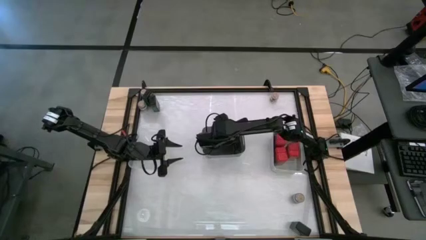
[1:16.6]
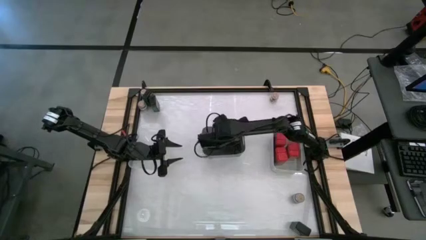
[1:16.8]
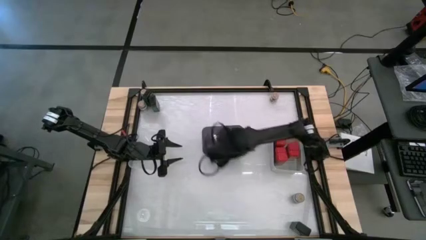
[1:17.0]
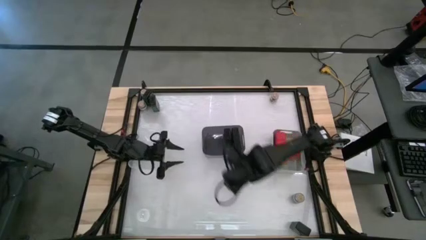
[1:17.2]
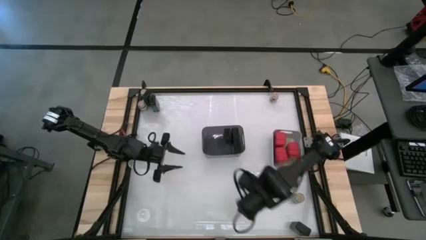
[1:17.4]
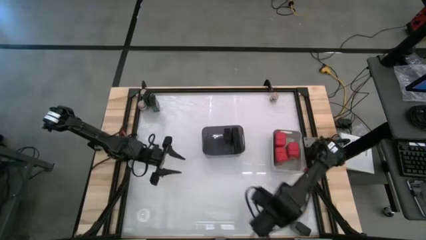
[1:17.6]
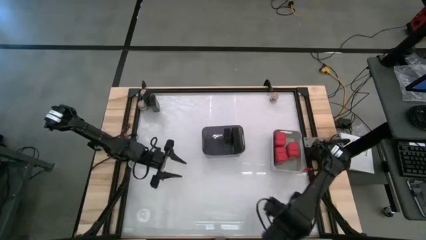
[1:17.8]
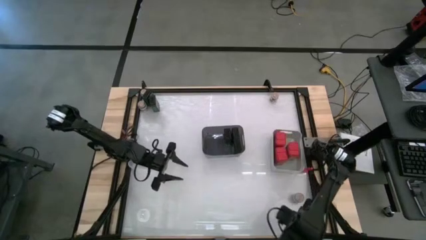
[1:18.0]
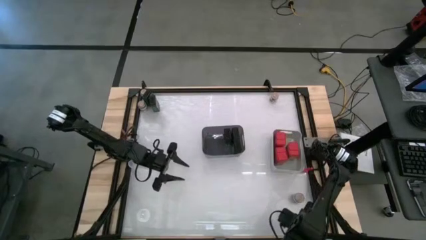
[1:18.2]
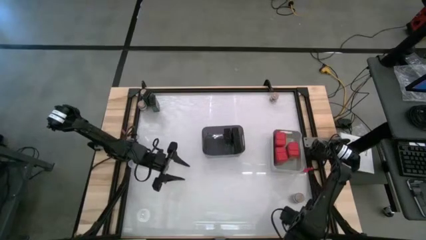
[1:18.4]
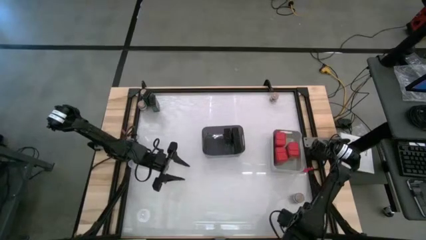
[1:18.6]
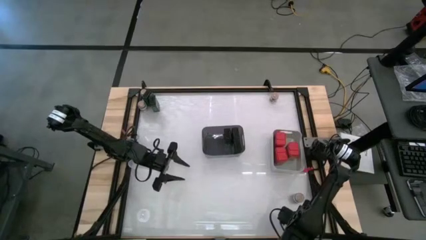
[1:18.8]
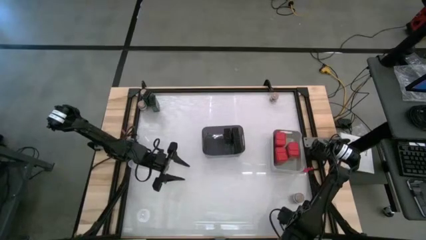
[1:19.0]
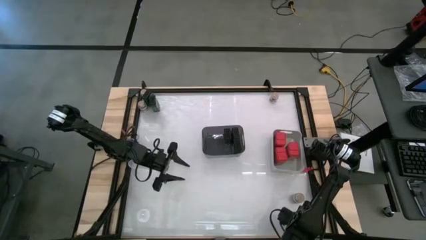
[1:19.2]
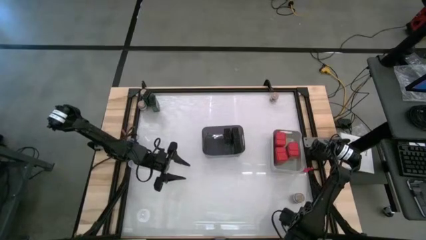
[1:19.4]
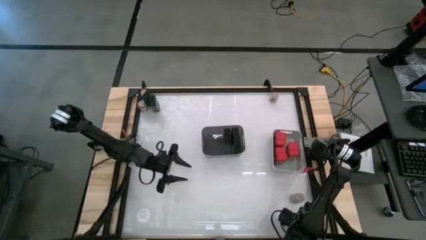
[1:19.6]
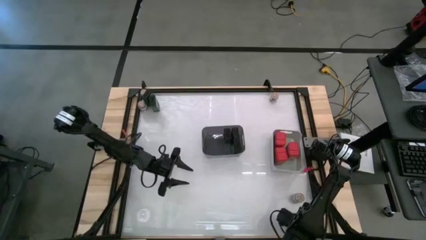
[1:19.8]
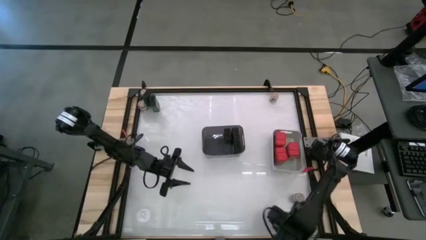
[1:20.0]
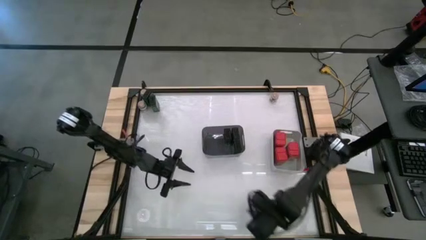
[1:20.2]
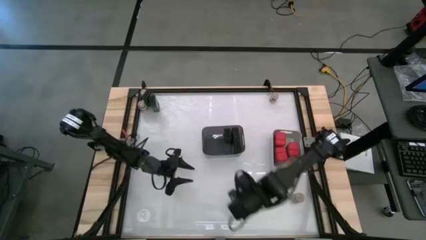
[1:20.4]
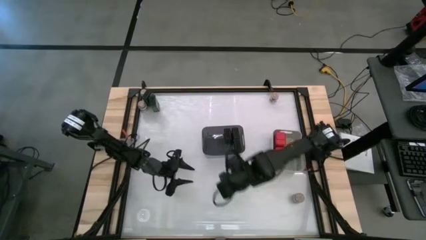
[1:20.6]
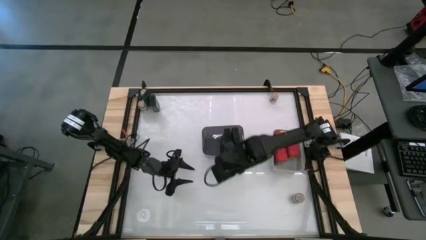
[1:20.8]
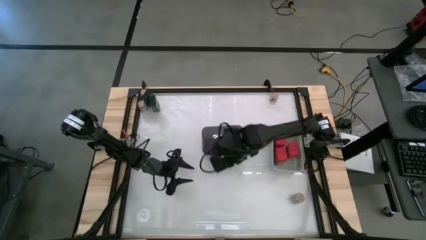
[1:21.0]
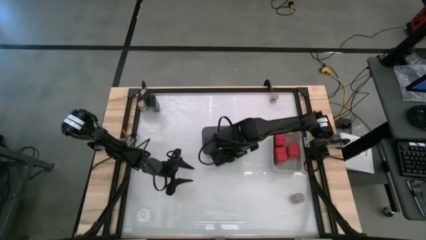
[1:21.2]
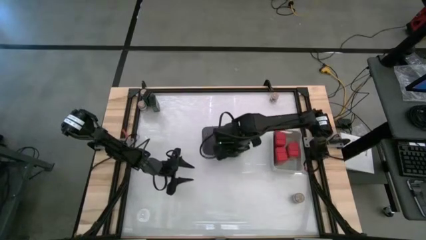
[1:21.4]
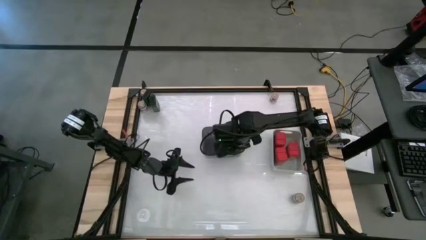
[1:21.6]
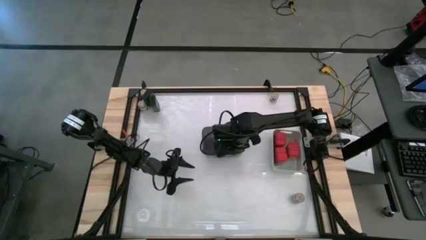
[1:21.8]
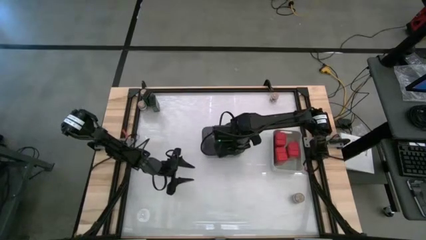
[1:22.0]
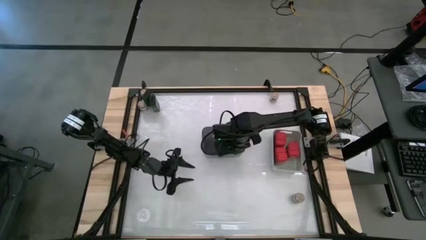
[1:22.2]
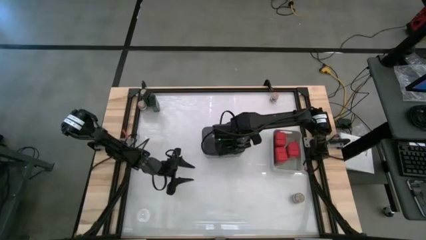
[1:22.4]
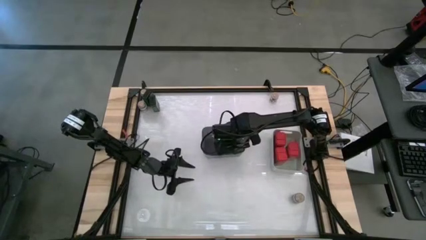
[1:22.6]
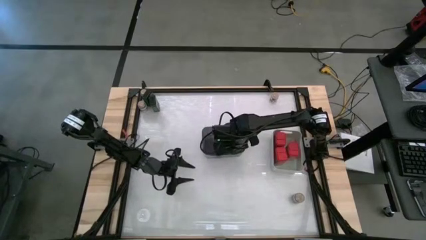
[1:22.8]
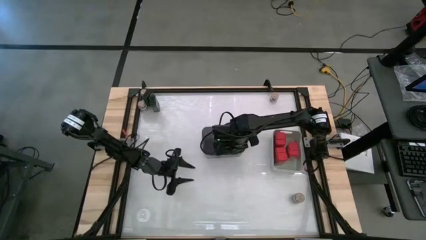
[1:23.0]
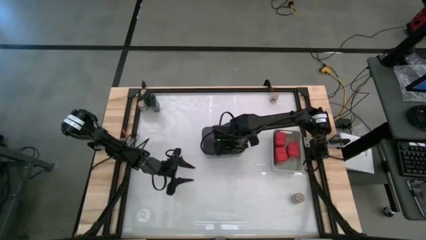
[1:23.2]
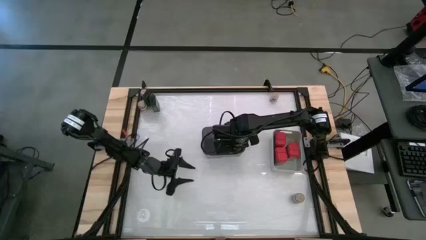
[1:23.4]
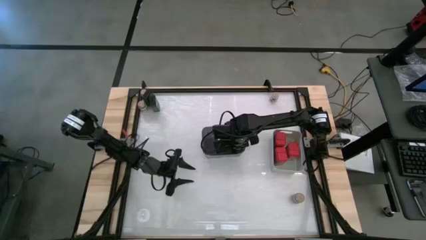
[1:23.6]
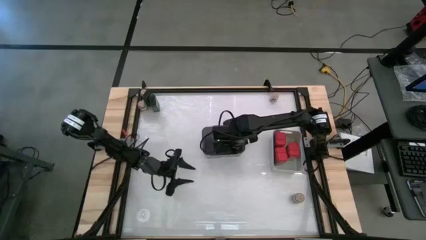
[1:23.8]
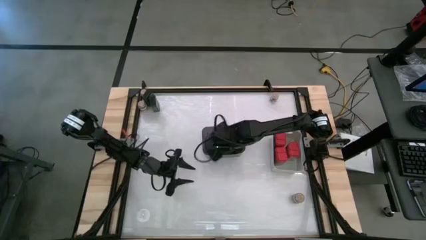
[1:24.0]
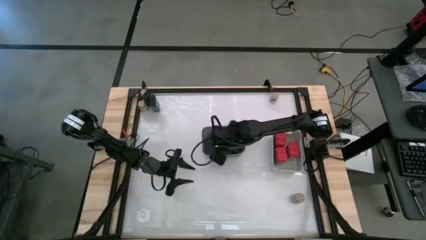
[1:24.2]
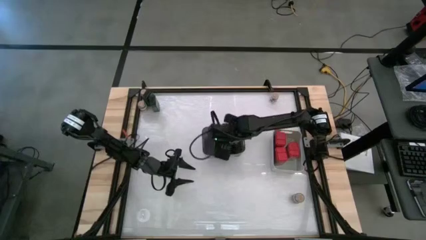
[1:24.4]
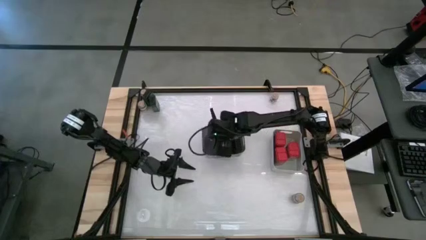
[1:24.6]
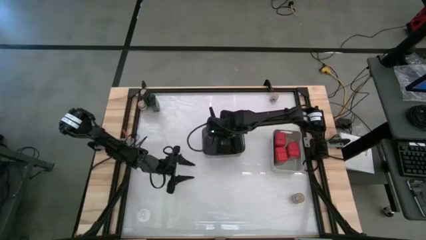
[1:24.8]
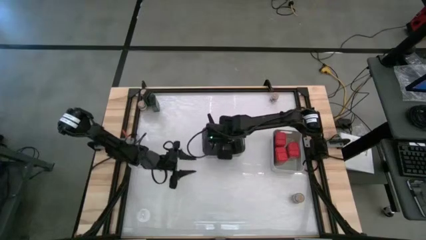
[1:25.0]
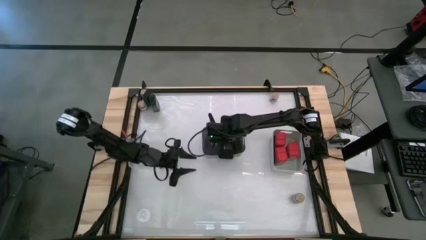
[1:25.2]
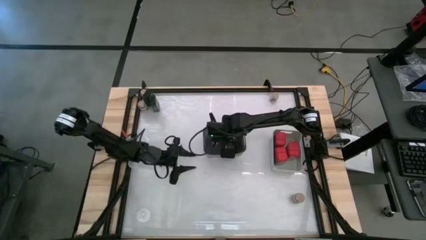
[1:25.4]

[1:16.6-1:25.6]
Task: Sort spices by type
Put the green spice can into the gray bin

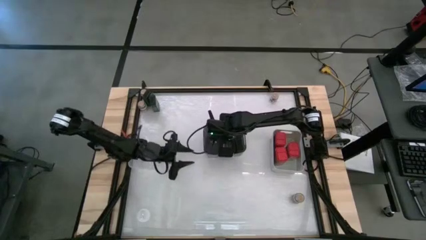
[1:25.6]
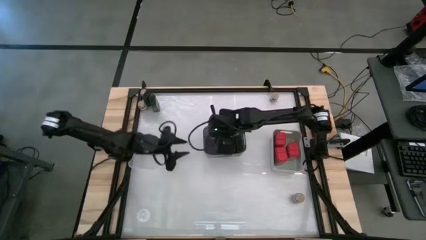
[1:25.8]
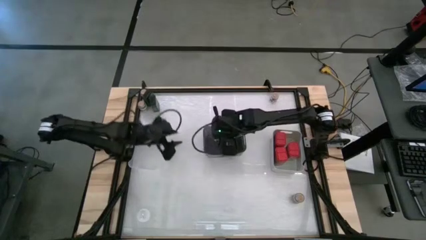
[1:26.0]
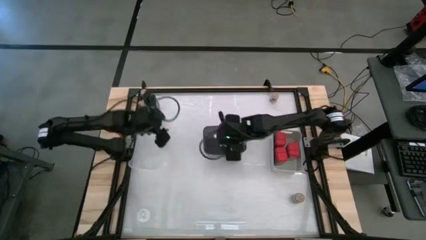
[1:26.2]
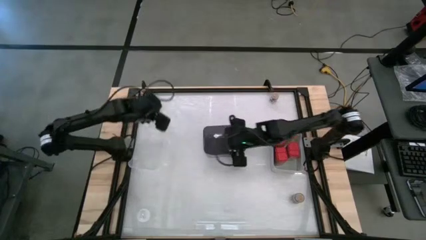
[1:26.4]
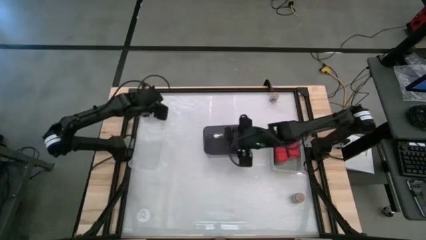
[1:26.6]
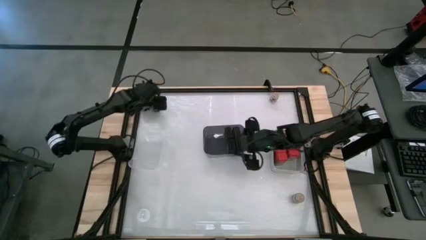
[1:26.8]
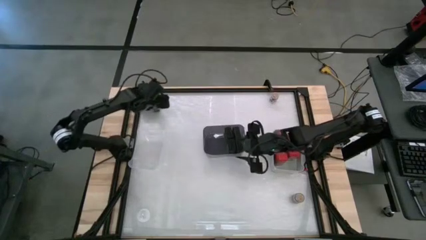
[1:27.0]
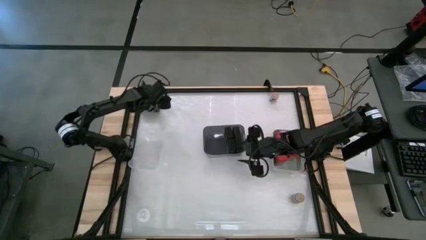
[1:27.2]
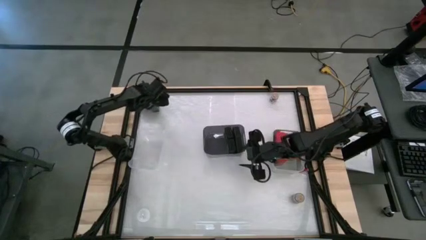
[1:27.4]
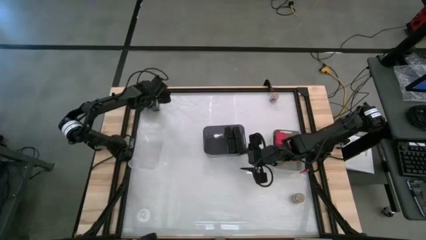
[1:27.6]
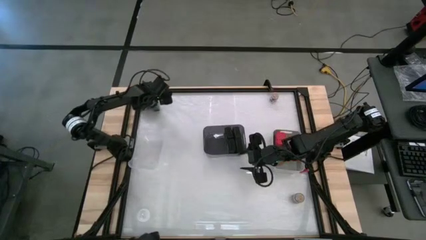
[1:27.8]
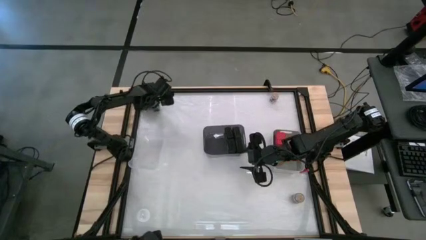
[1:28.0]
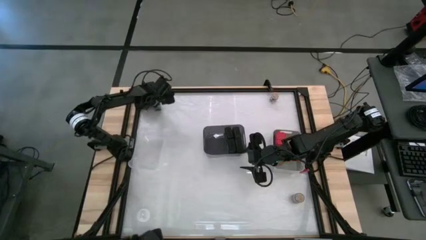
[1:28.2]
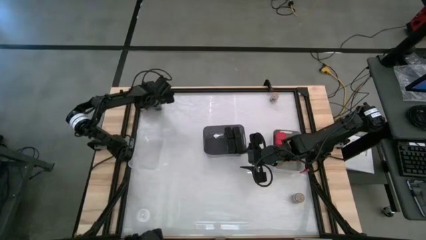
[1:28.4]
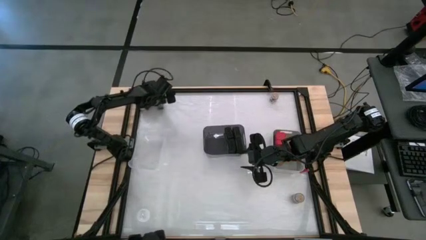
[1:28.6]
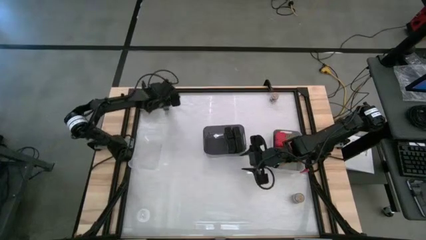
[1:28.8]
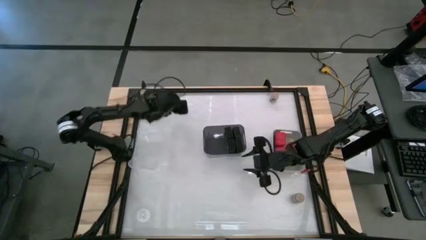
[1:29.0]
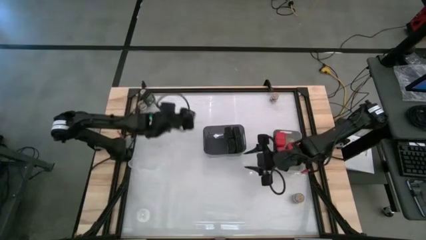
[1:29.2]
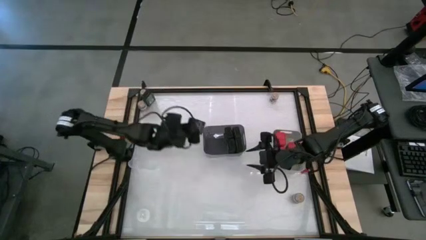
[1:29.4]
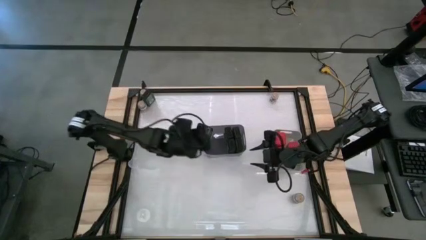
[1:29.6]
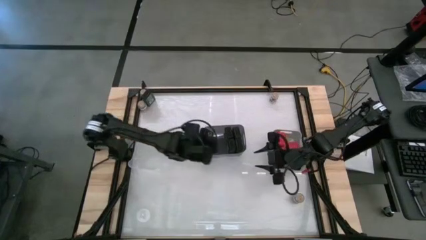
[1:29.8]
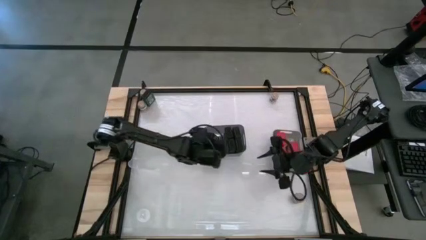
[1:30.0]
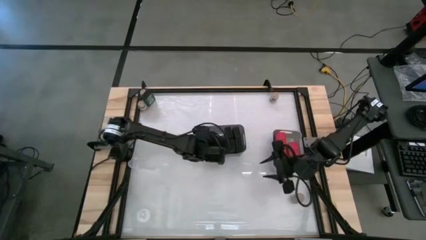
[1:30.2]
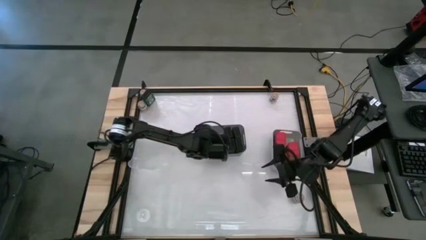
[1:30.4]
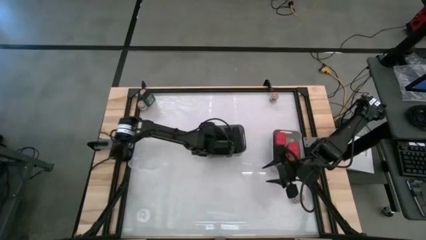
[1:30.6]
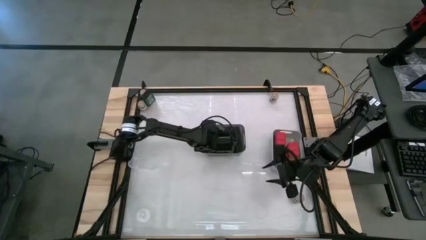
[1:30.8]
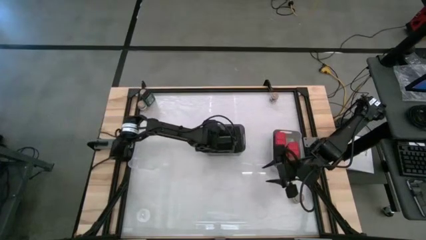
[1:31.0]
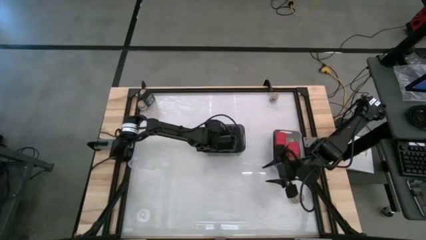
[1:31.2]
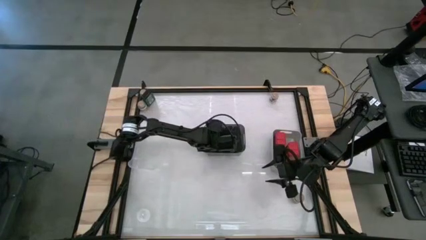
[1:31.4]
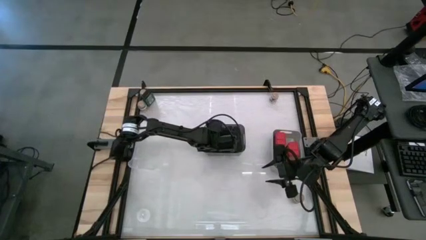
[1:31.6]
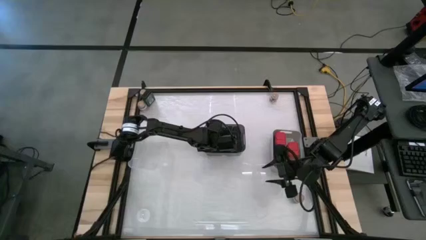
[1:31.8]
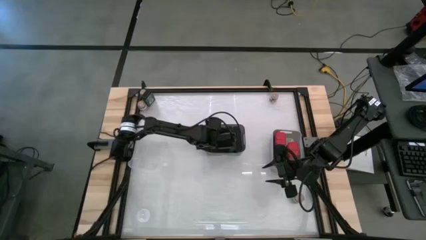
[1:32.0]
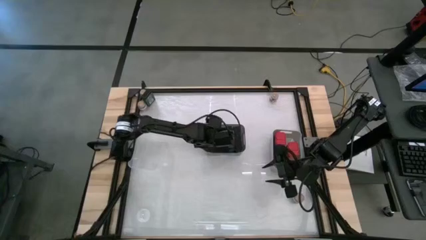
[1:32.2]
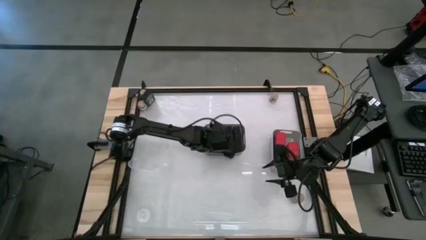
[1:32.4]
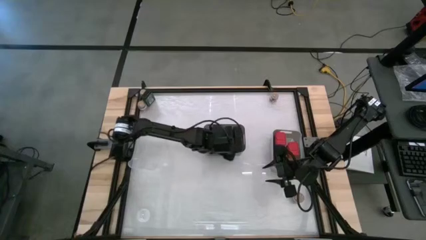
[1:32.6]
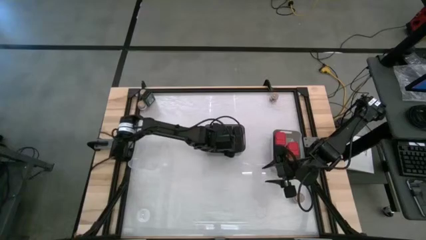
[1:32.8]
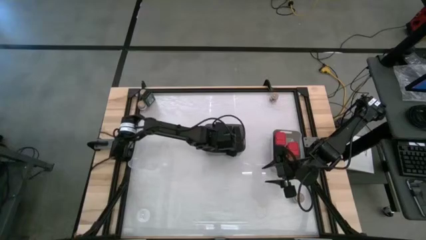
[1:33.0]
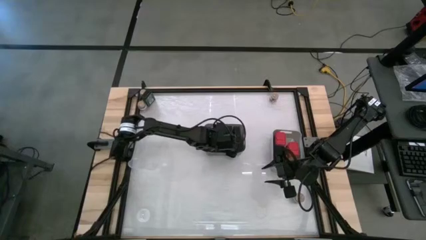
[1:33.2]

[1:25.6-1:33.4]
Put the green spice can into the gray bin
